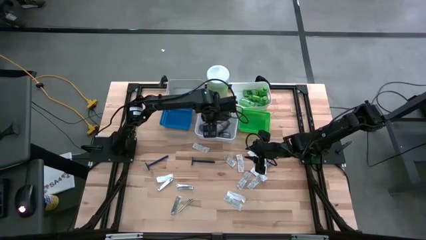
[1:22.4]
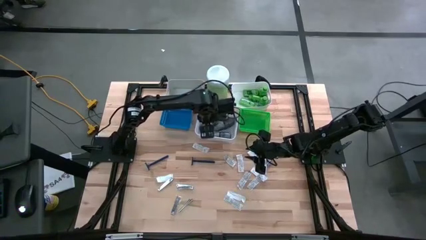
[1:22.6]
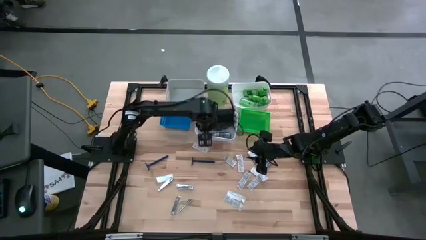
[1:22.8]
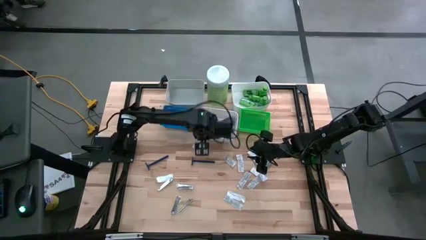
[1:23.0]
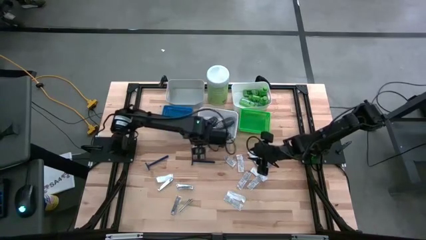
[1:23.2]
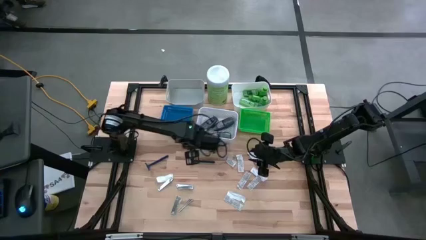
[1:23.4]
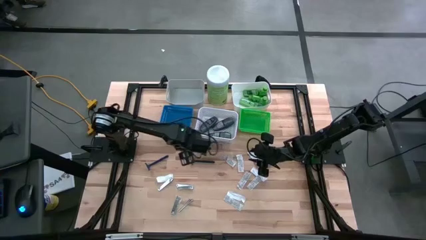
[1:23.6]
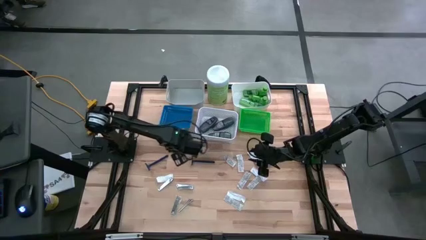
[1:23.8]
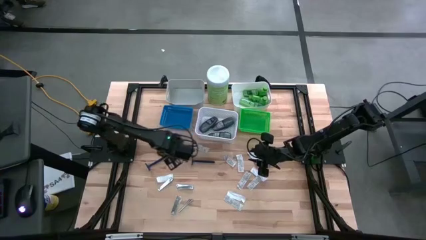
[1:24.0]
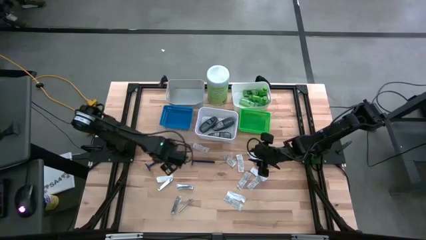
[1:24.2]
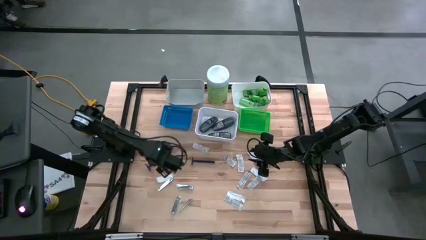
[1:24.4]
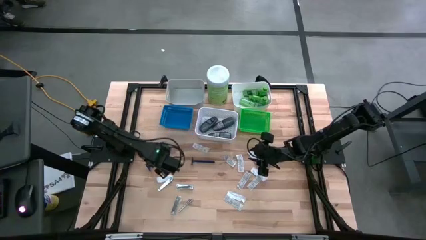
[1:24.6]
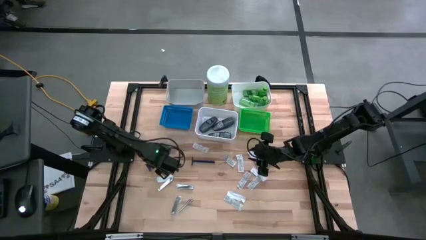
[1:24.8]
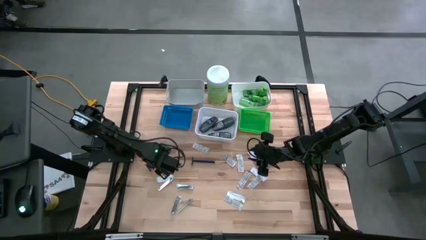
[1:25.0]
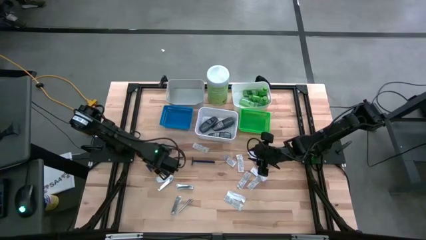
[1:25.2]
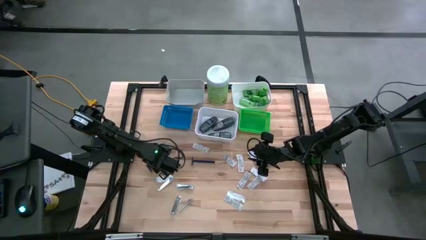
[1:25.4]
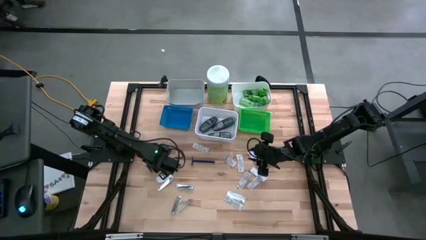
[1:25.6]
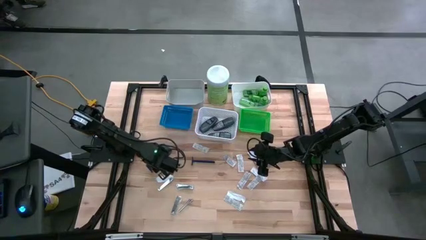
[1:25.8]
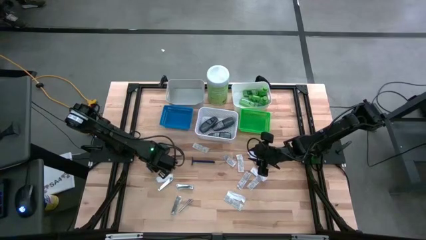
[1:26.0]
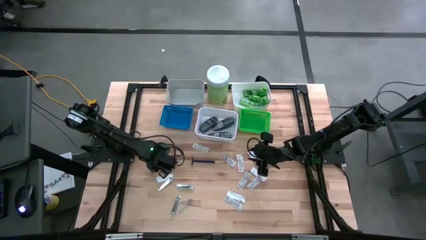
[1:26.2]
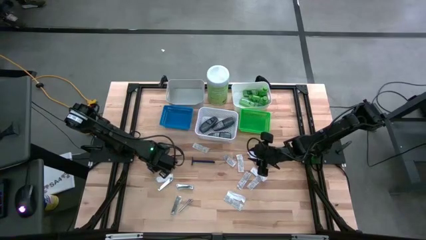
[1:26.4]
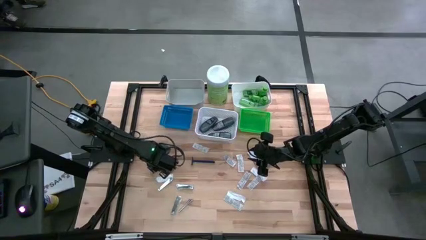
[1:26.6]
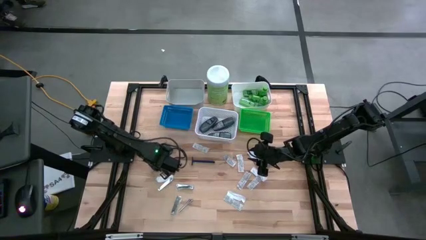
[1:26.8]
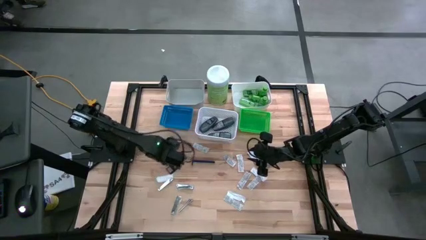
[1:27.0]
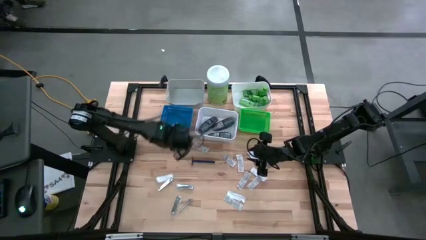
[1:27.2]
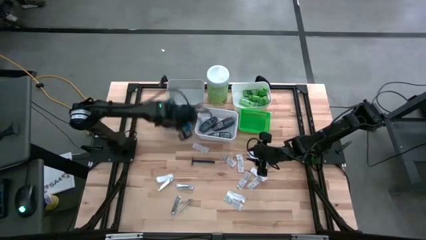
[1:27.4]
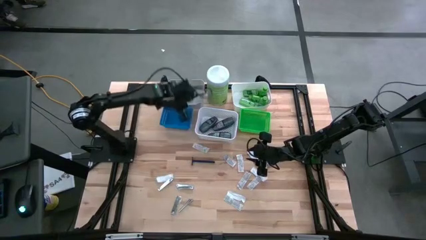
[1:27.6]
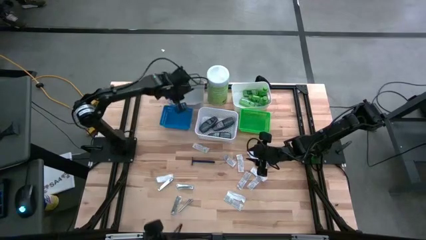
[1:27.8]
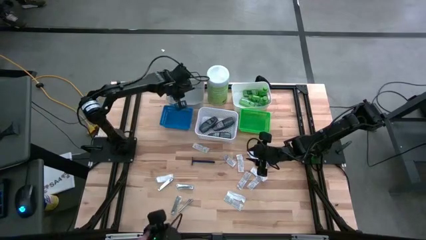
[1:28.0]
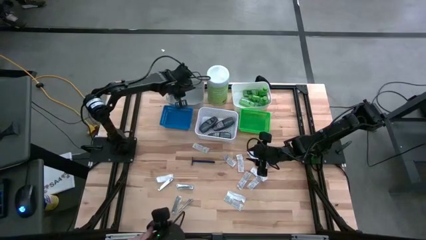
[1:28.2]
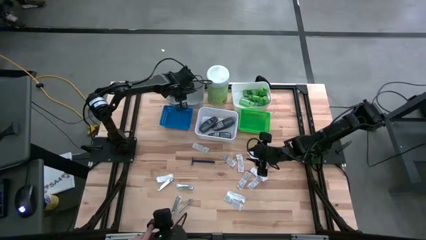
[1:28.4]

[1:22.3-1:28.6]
Task: Pick & Place Travel size toiletries
Put the blue razor into the grey bin

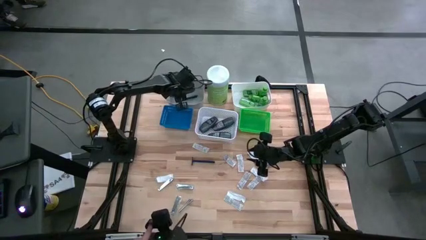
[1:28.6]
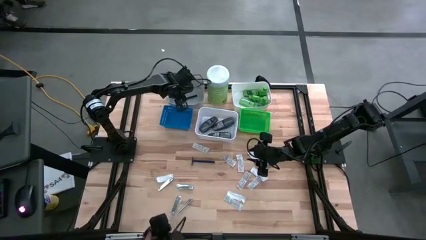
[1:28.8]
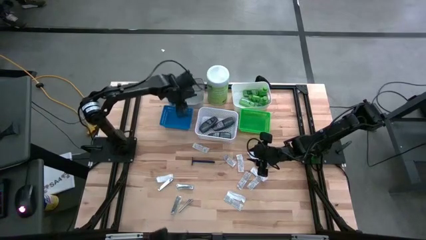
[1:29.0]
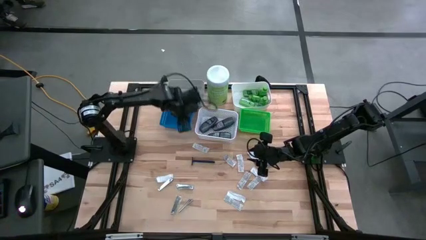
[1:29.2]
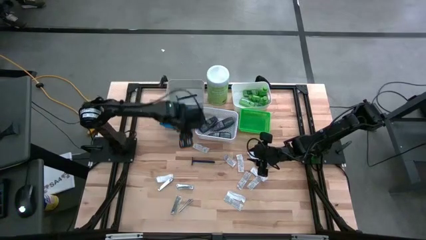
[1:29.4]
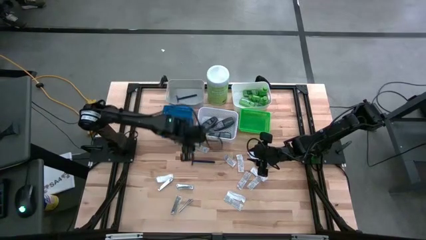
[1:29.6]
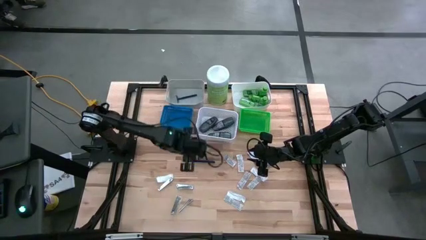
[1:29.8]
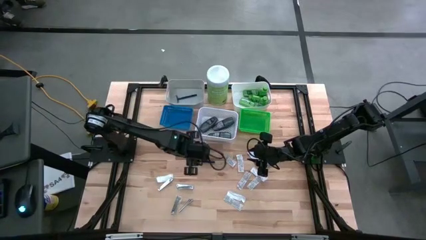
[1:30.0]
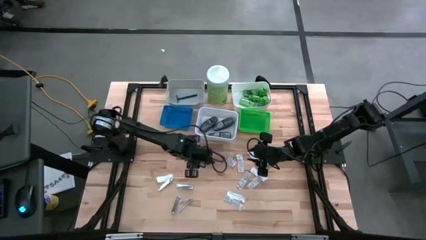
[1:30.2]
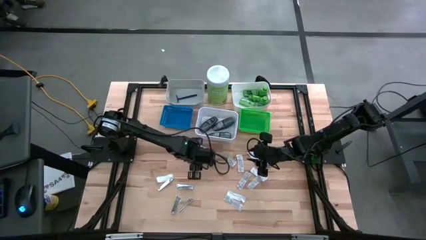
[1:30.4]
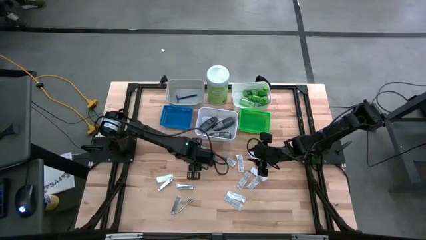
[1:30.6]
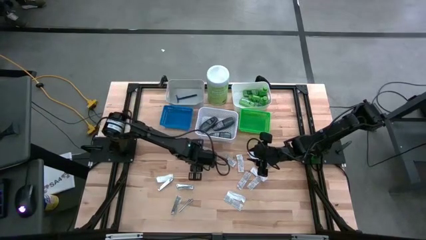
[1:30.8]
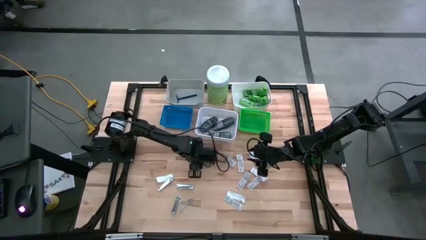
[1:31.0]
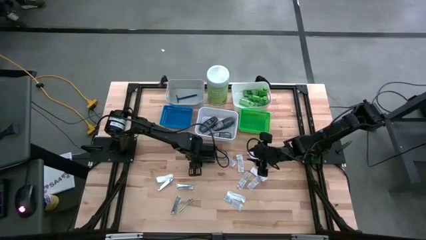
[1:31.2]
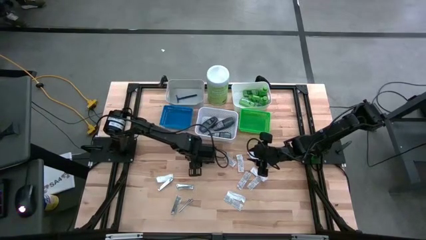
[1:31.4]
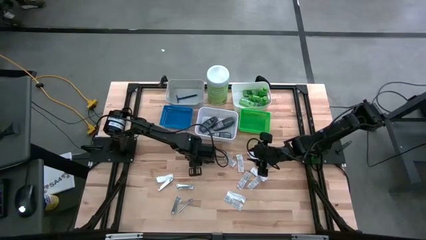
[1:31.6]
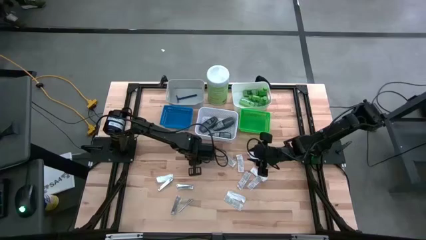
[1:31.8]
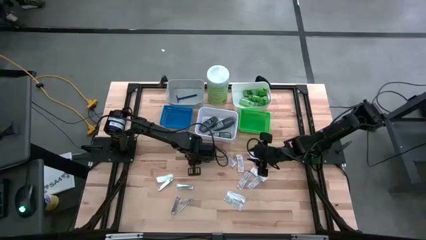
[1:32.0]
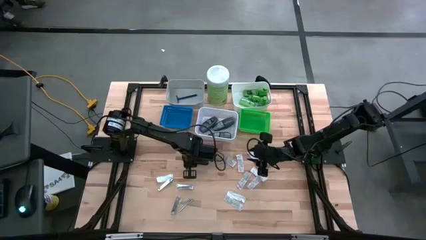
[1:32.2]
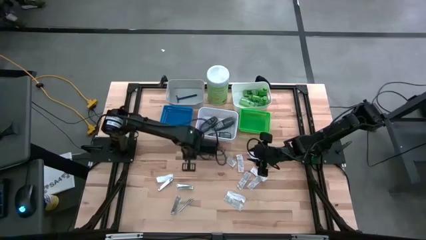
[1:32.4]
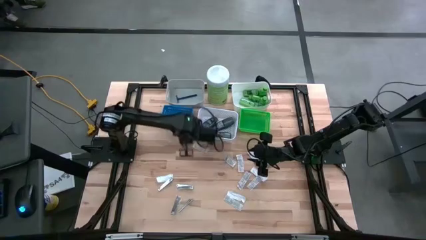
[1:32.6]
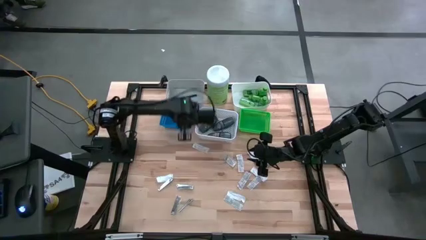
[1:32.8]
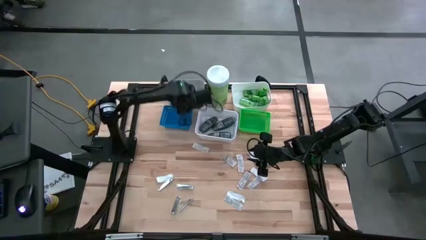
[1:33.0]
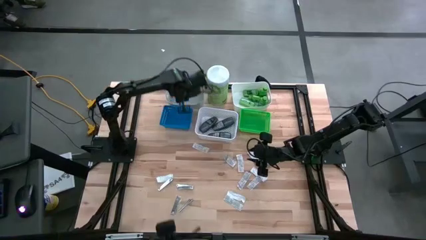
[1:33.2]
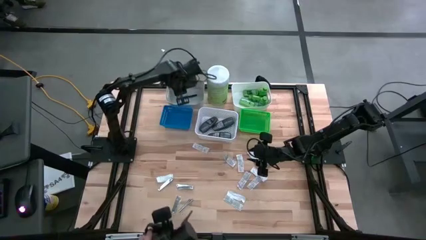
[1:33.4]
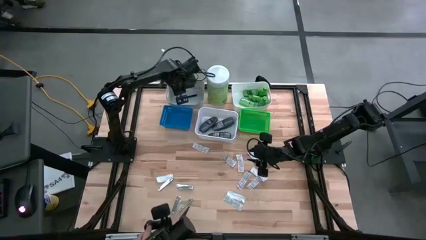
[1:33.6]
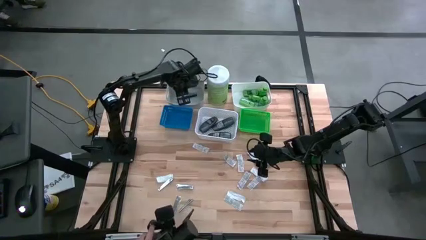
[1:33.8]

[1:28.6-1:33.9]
Put the blue razor into the grey bin
